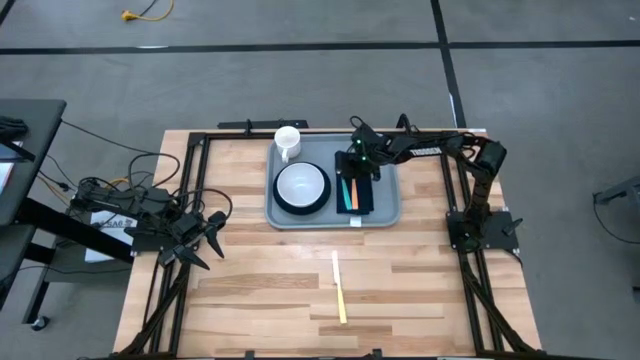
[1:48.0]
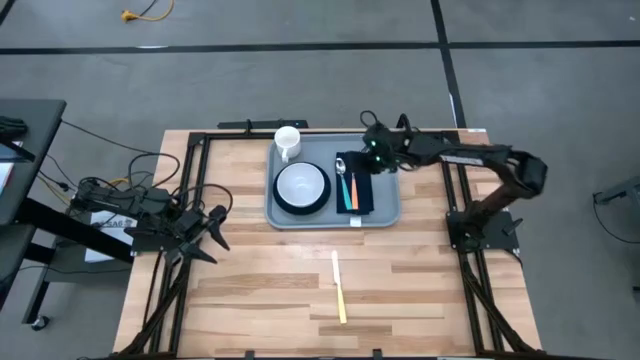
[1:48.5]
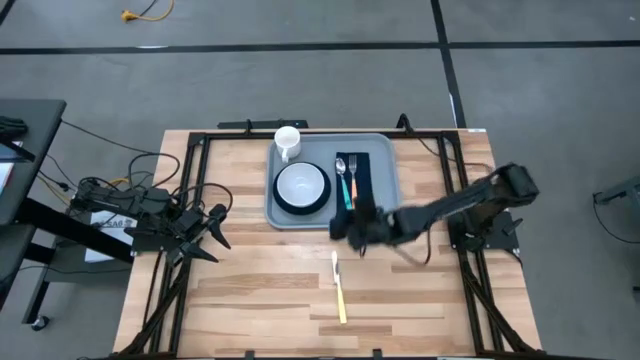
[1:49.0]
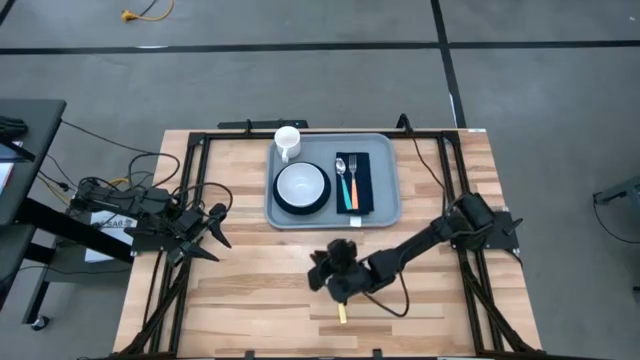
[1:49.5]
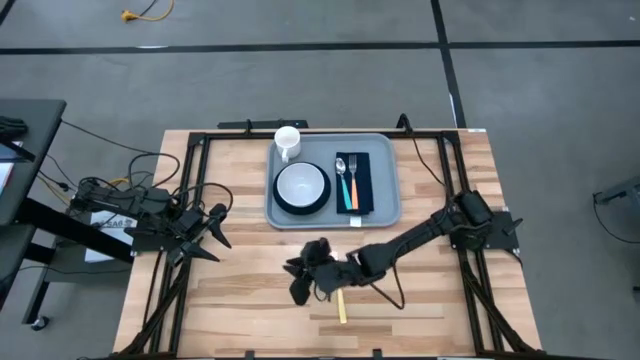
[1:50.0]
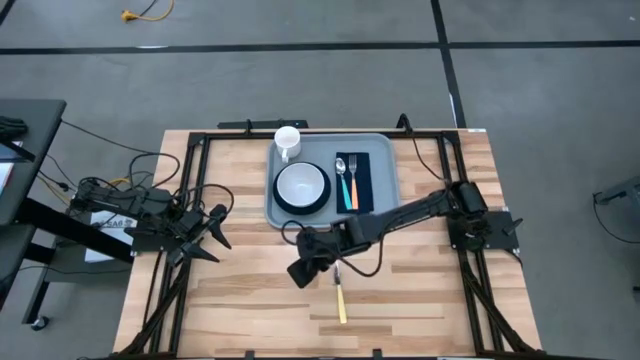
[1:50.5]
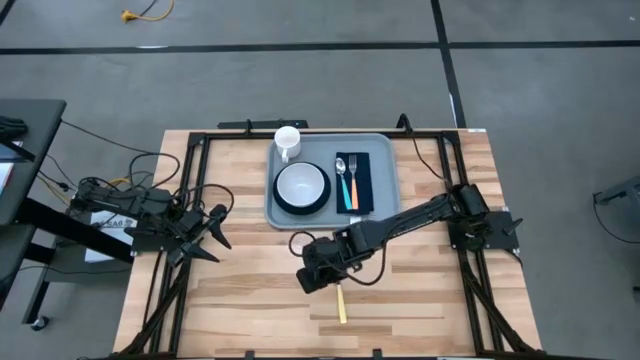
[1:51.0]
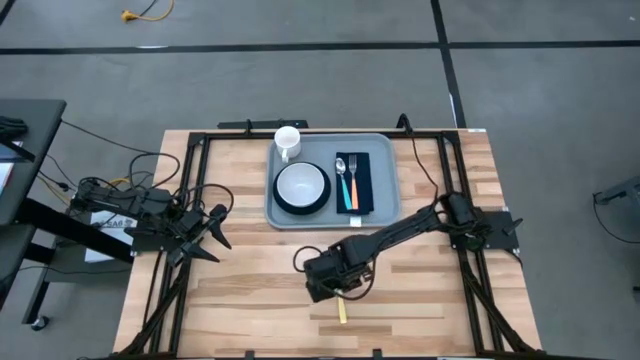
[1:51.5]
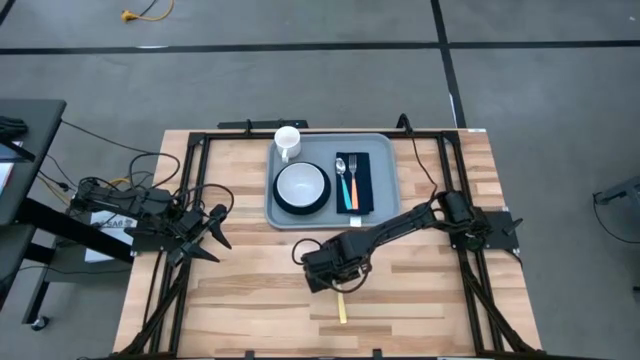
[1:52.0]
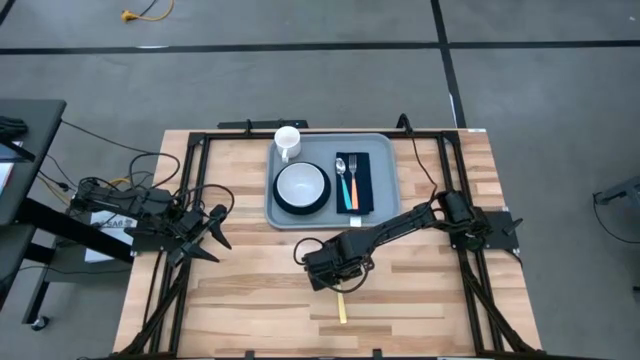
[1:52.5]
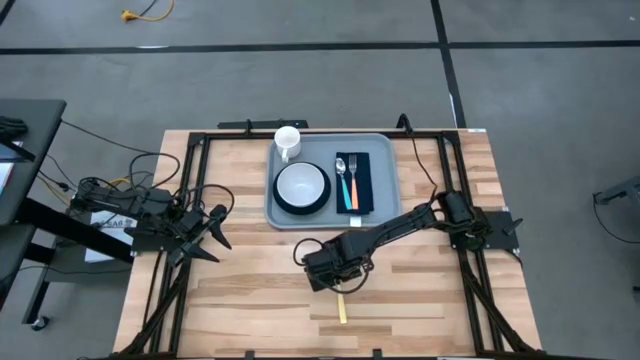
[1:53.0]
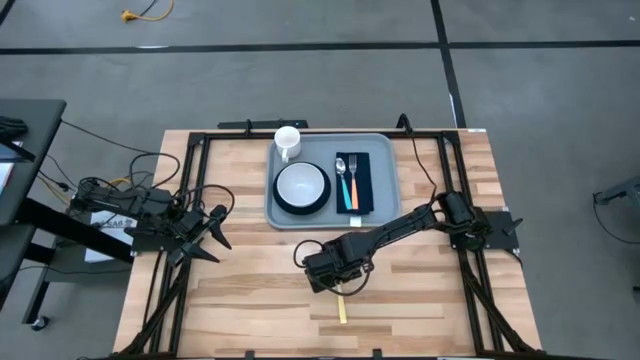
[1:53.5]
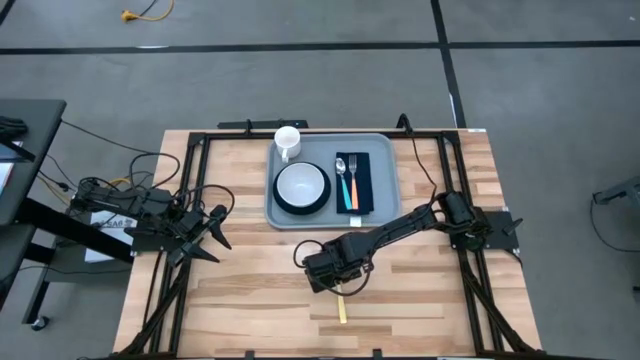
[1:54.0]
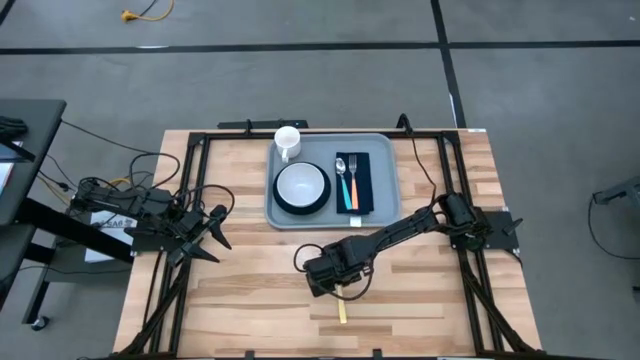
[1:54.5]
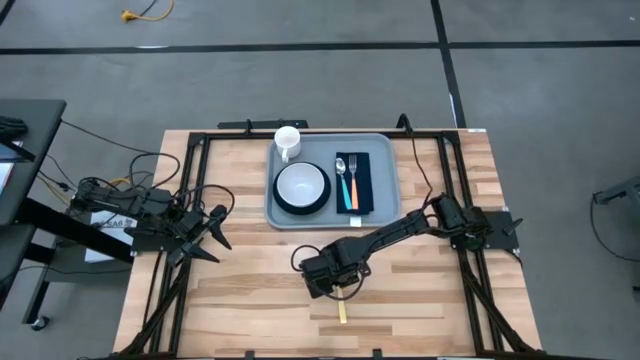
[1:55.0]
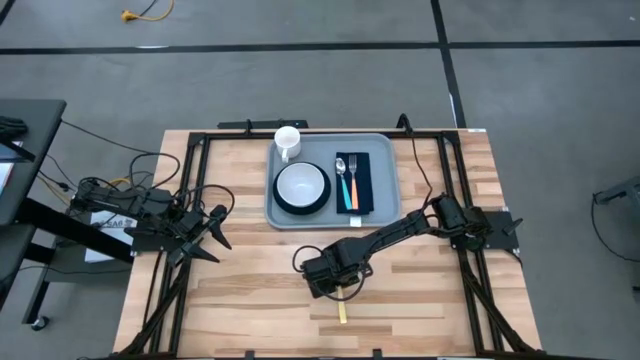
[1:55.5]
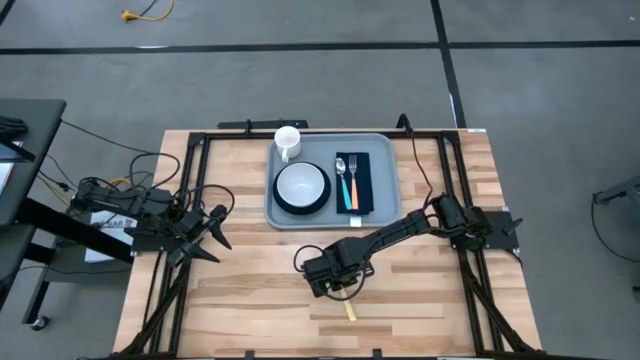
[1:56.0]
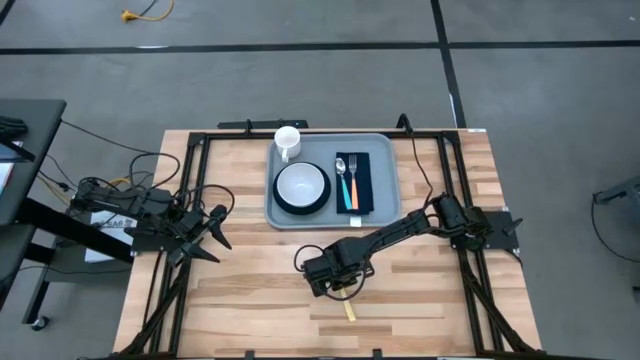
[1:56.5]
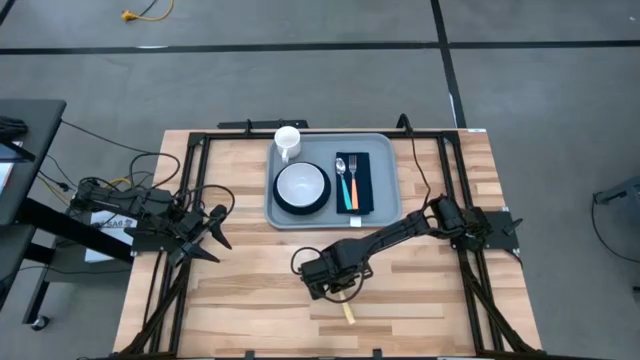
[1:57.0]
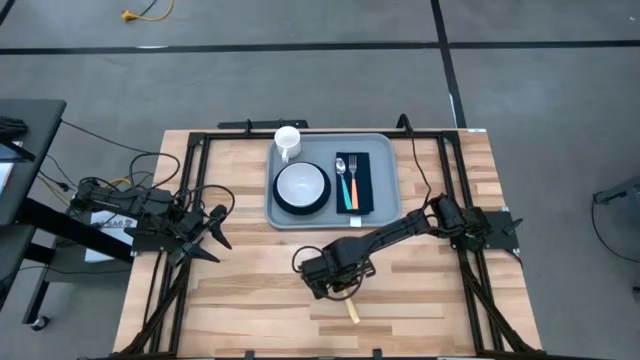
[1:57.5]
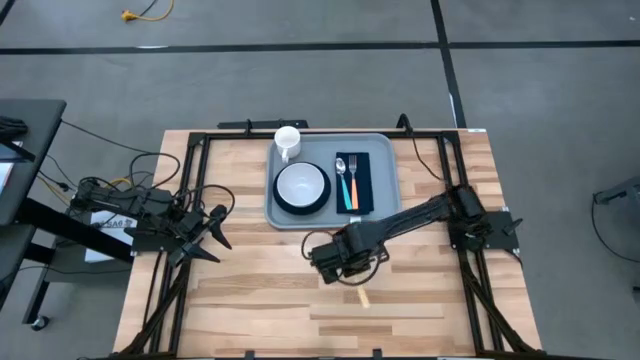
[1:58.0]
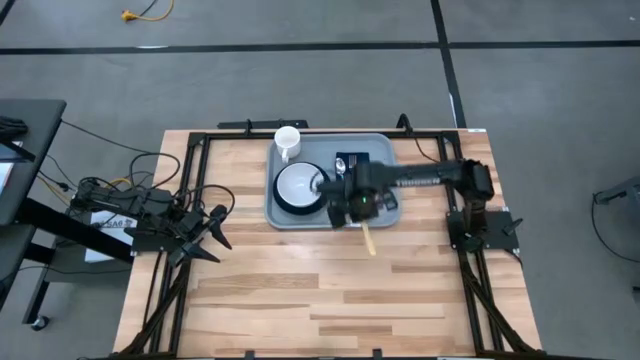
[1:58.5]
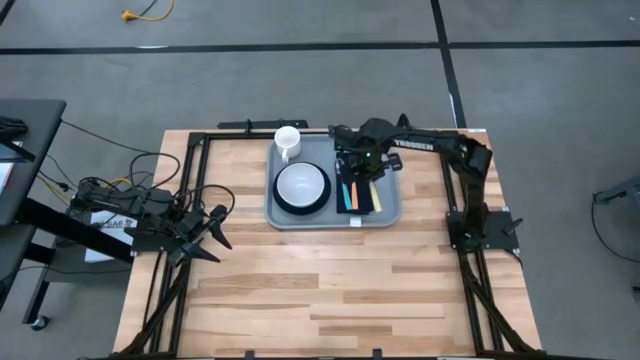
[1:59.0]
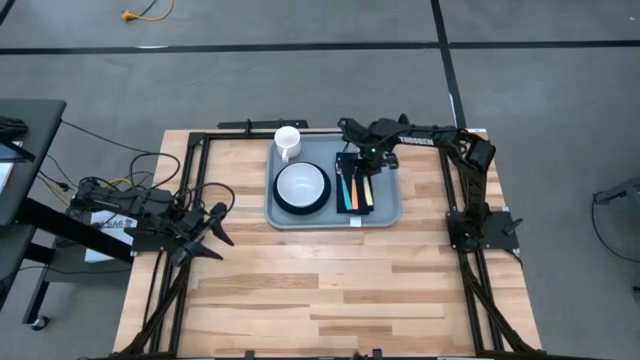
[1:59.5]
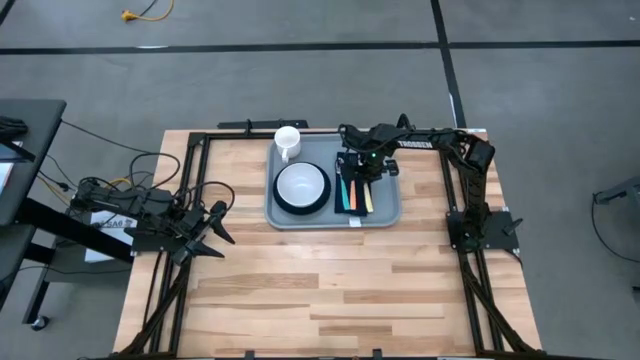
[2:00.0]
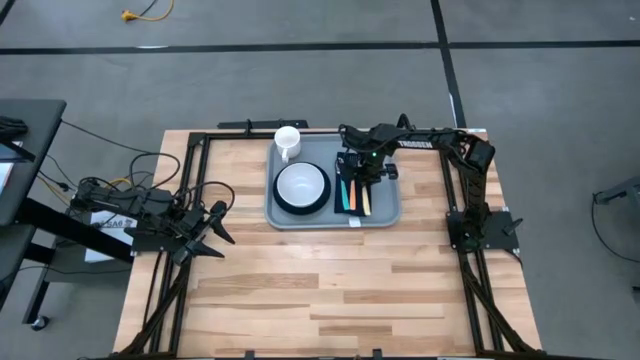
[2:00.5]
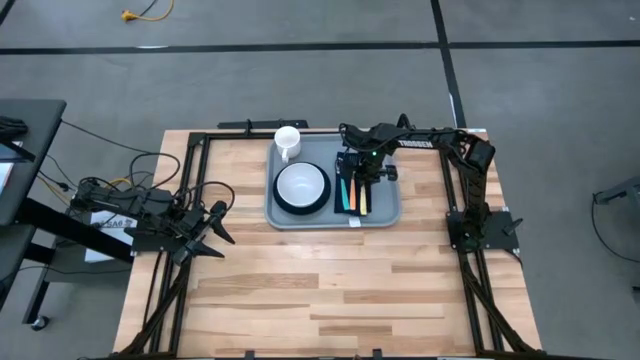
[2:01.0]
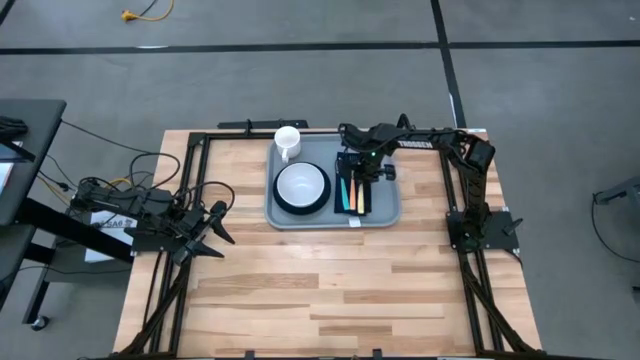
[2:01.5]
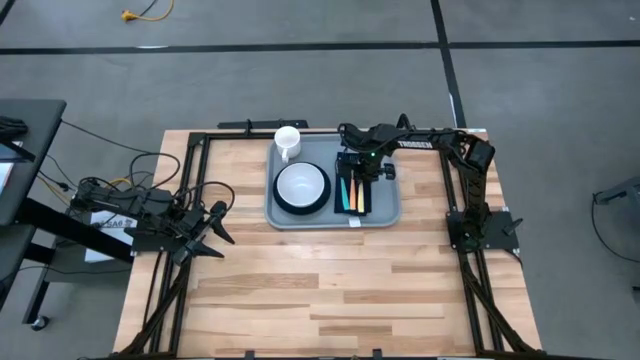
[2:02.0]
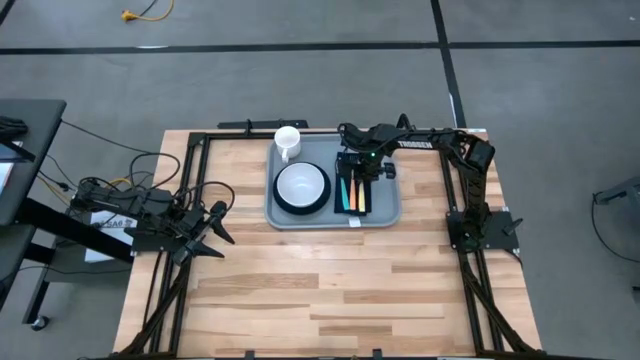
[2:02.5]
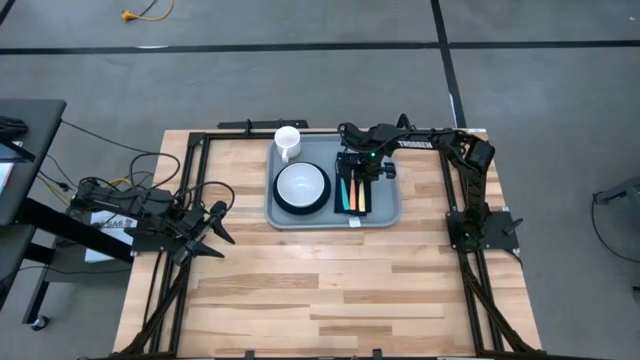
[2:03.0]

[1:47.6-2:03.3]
Task: Set up tray
Put the yellow knife on top of the dark blue napkin to the right side of the orange fork

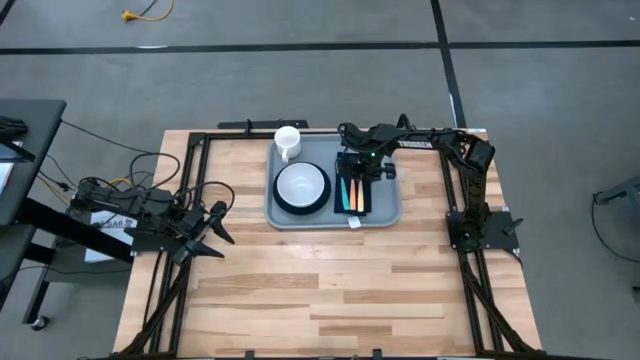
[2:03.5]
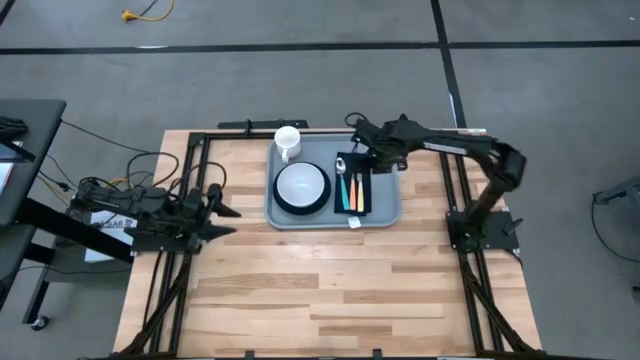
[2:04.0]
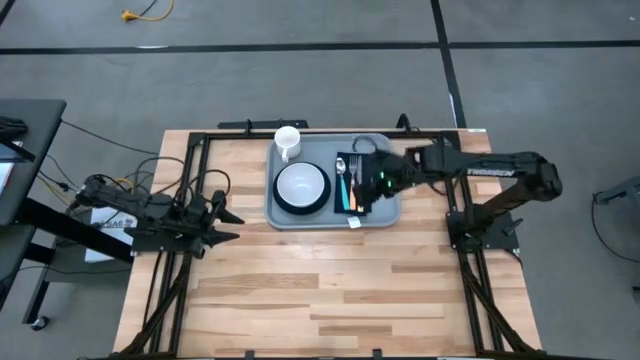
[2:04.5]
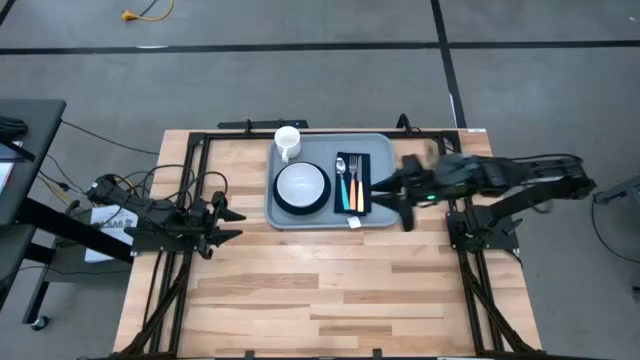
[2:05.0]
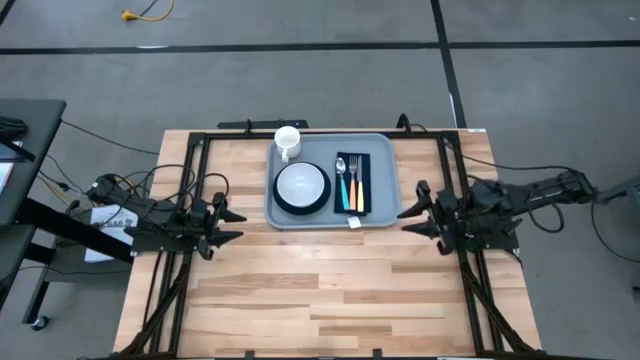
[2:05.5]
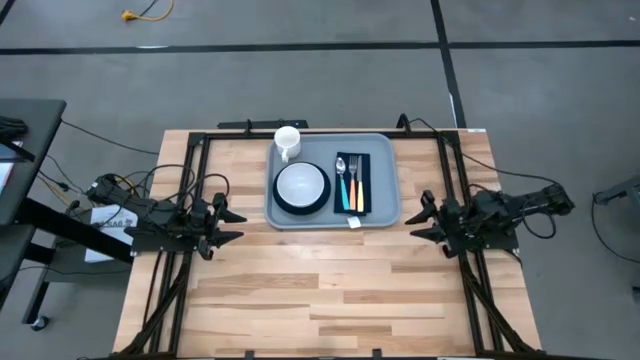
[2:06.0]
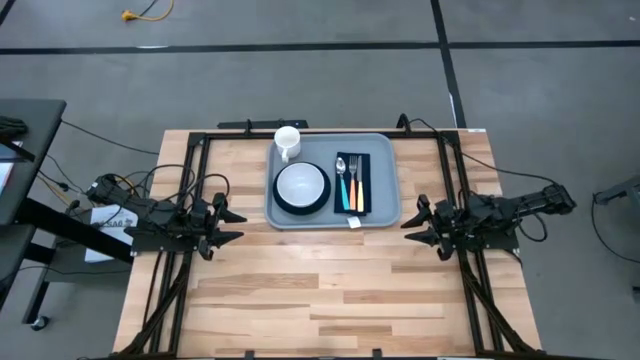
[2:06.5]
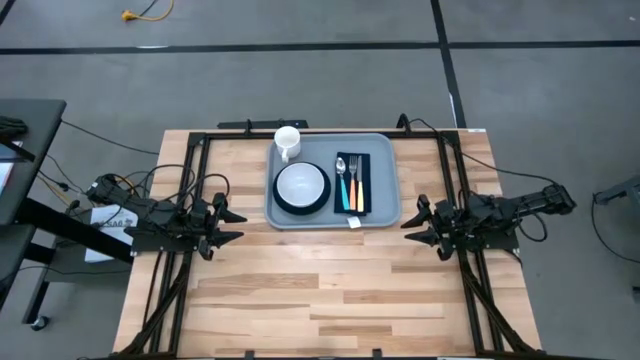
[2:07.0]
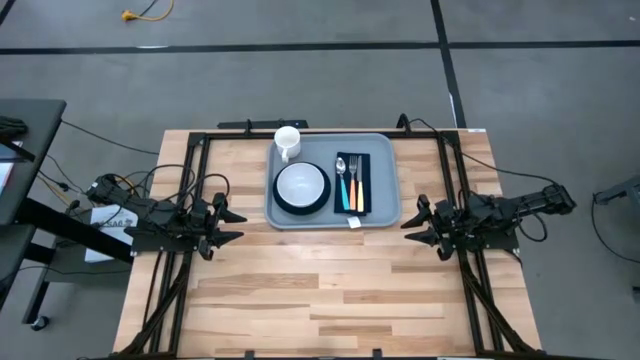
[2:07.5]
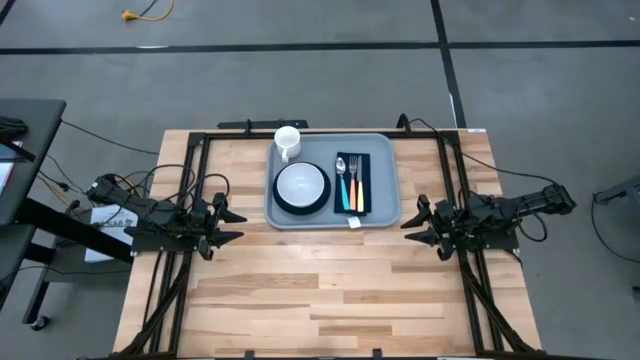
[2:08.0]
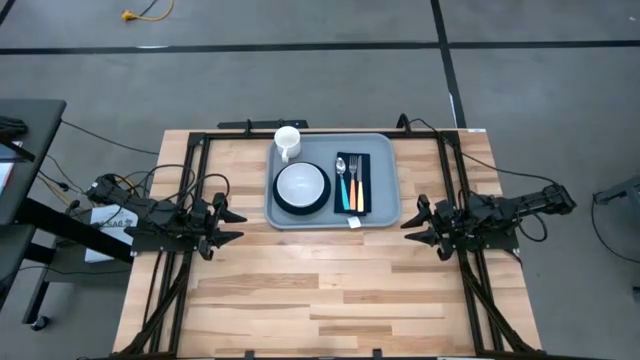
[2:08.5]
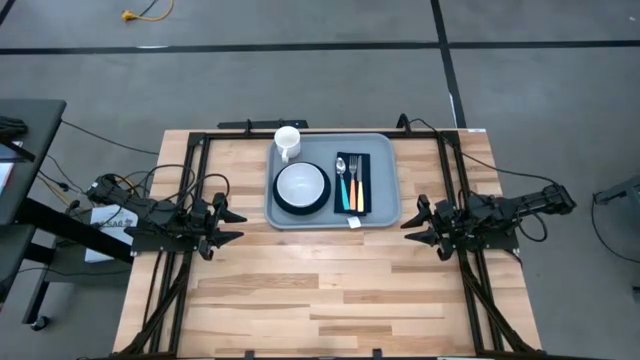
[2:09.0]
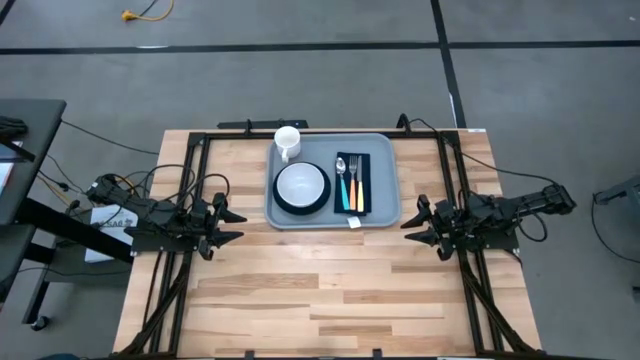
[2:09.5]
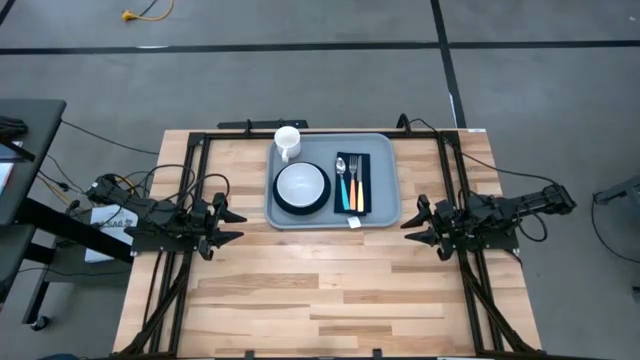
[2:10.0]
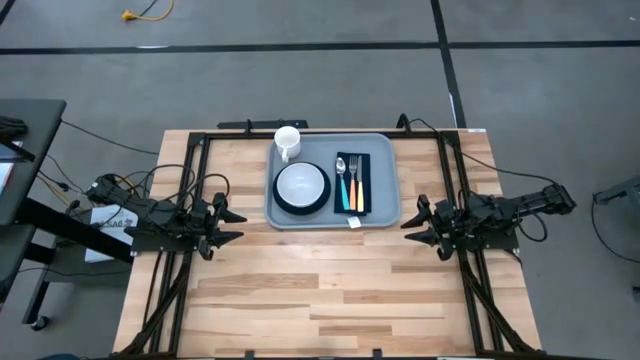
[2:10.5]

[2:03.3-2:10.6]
Return to Home Position
